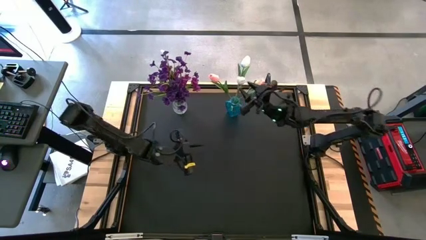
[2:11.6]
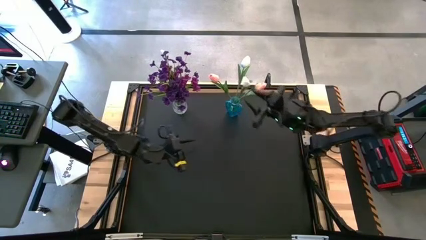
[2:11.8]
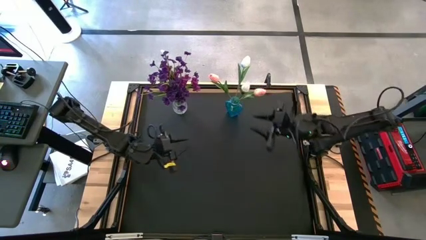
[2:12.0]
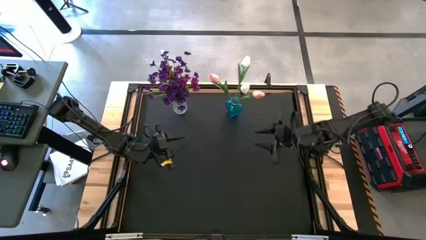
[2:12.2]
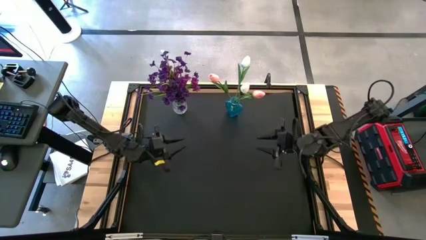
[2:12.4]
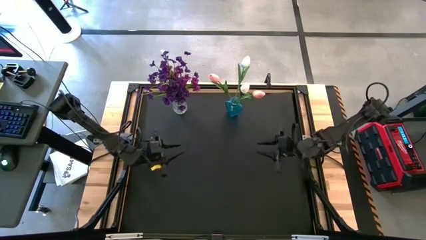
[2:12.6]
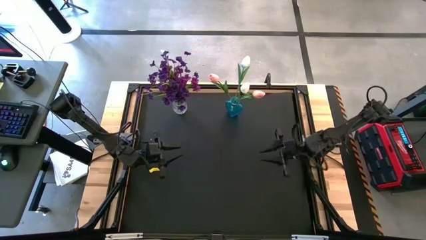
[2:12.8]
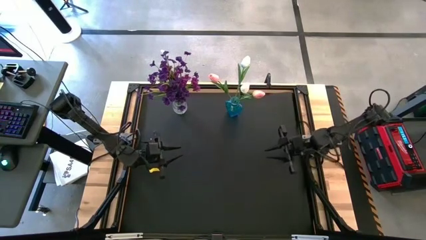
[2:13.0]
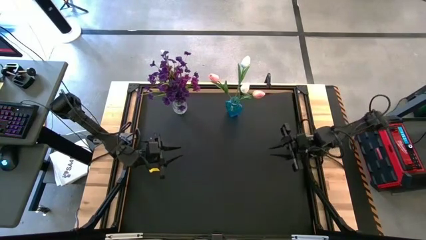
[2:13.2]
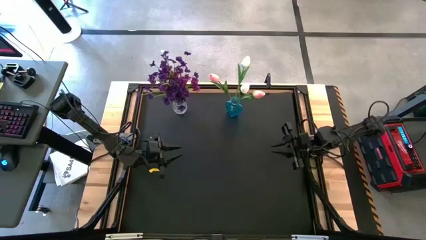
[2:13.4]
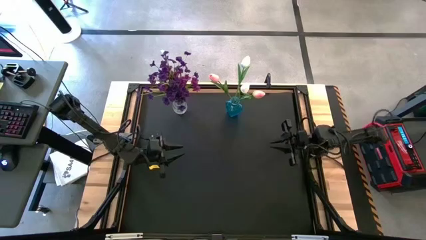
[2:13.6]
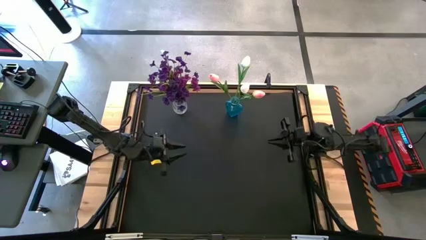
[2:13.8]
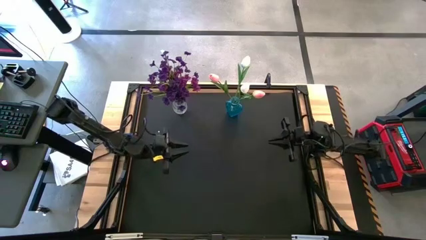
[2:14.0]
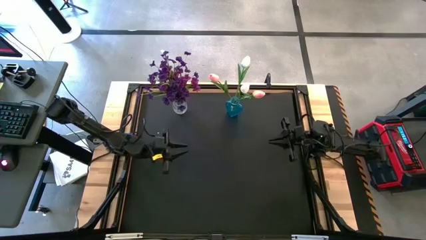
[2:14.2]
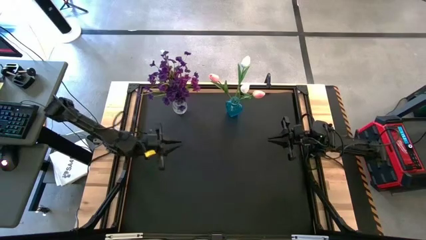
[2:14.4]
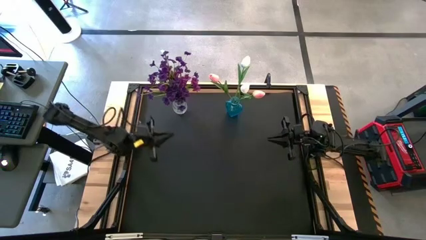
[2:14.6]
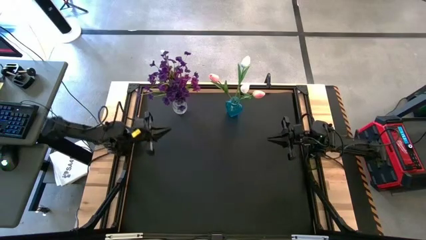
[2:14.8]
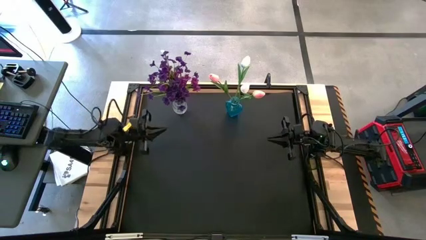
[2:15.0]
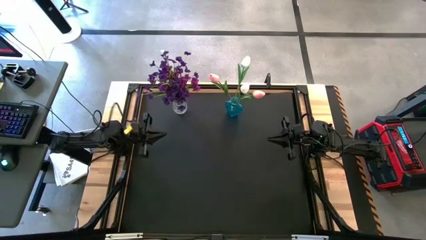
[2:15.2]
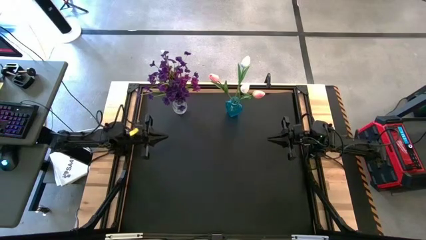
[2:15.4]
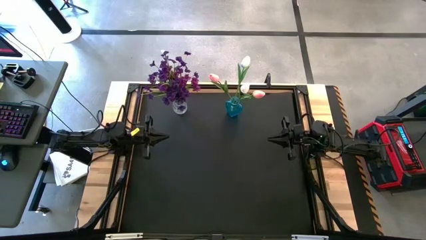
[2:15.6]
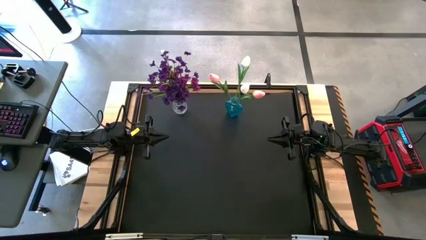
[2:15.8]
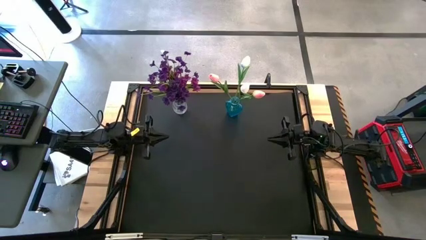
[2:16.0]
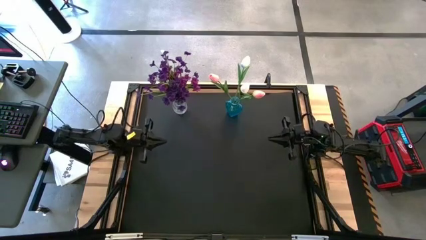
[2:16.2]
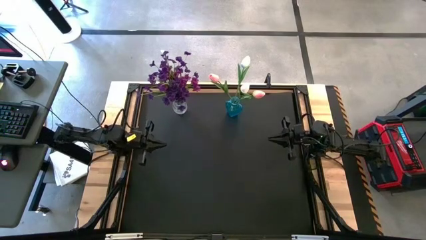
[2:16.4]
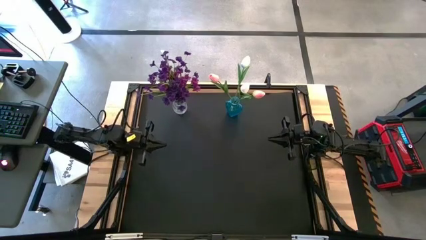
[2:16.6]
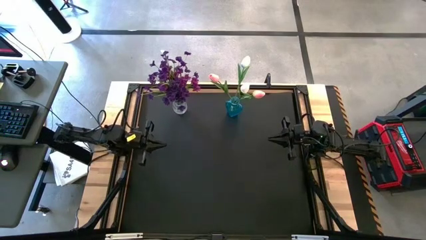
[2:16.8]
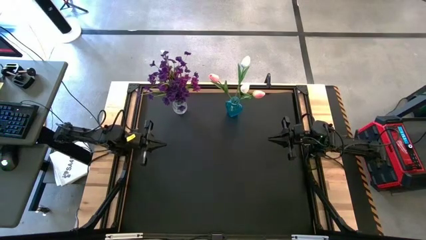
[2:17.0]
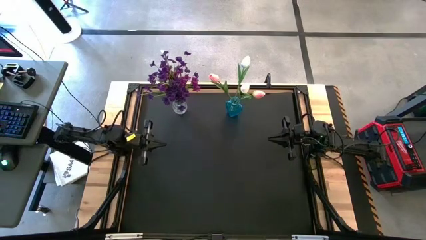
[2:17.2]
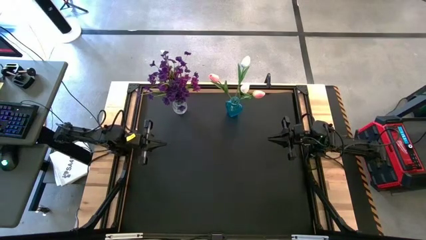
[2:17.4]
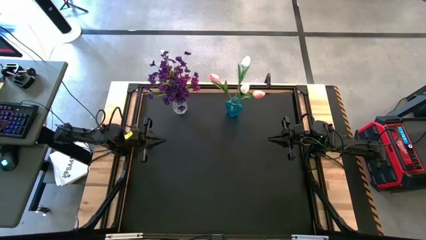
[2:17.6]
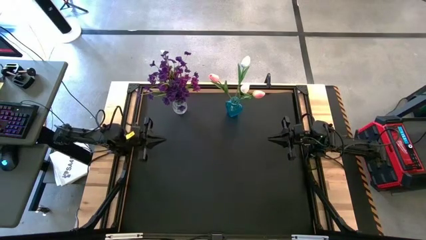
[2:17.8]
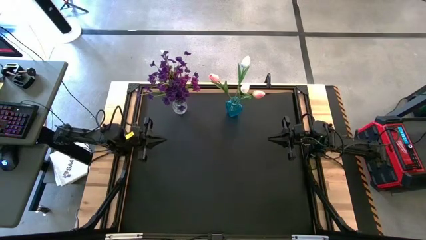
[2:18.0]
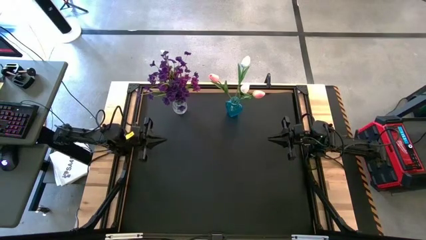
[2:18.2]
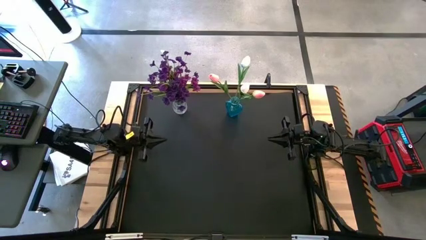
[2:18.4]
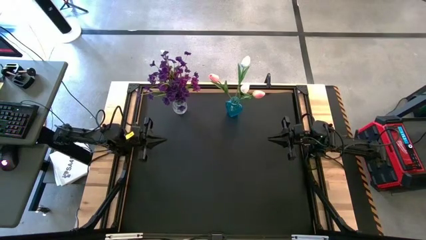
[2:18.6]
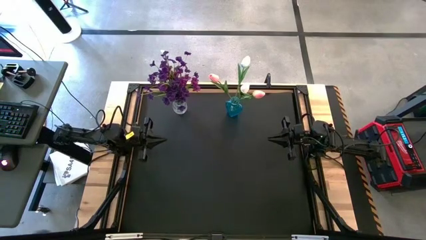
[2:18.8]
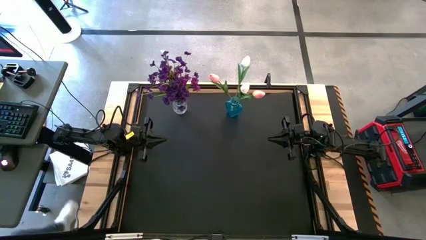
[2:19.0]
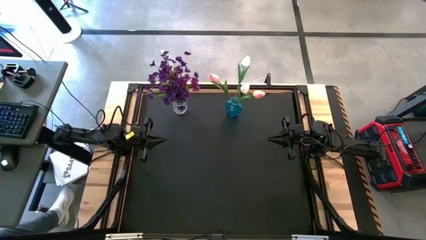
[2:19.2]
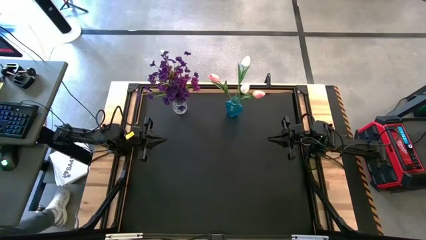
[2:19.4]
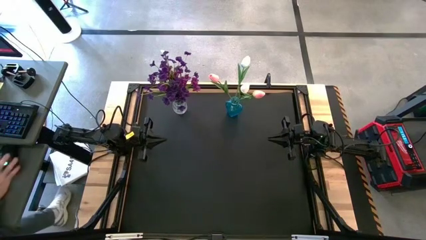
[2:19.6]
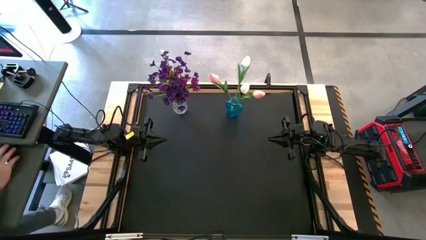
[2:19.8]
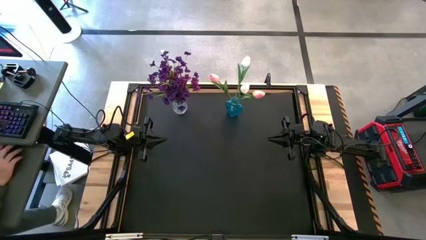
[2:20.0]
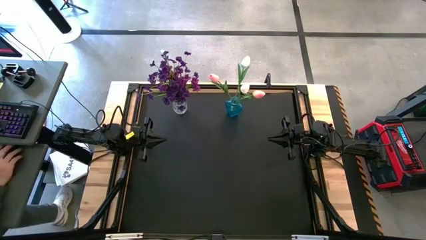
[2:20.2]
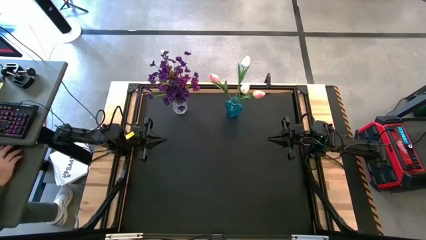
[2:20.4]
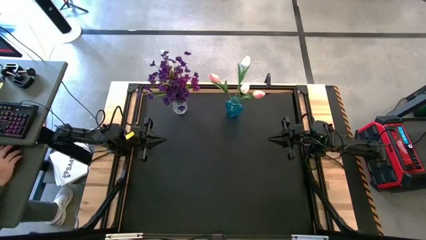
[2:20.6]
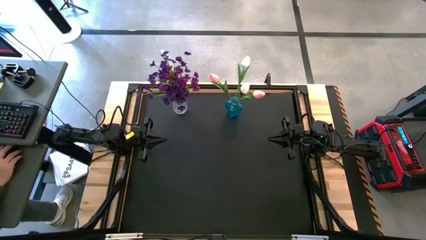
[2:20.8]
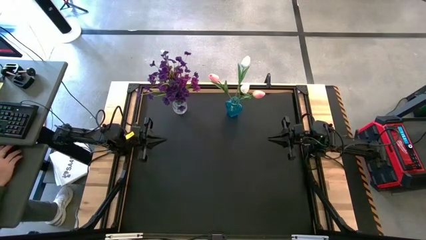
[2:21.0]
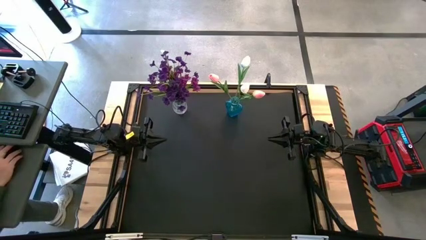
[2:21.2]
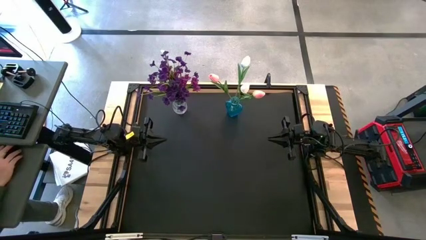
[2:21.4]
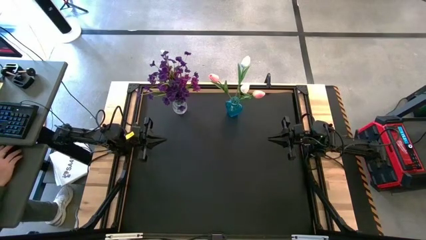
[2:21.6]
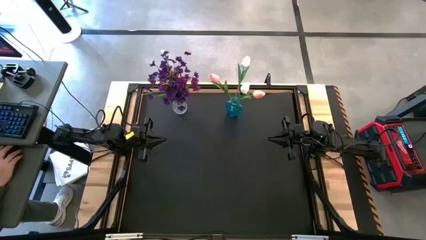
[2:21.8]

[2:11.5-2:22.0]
Task: Sort flowers into vase by color
Return to Home Position

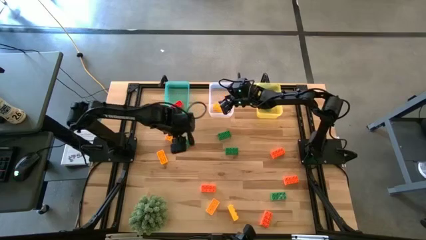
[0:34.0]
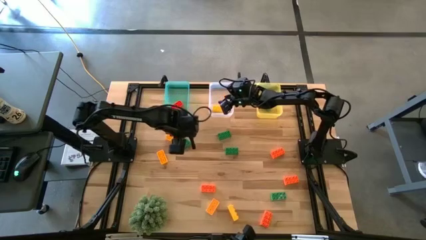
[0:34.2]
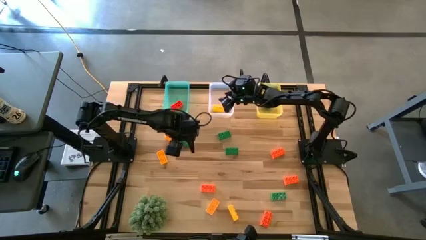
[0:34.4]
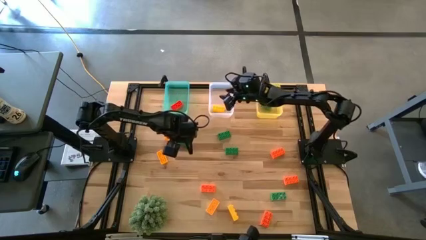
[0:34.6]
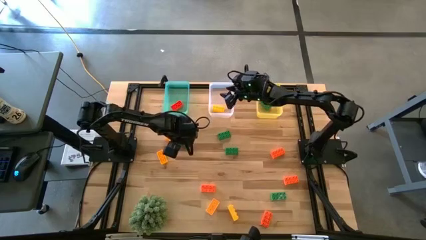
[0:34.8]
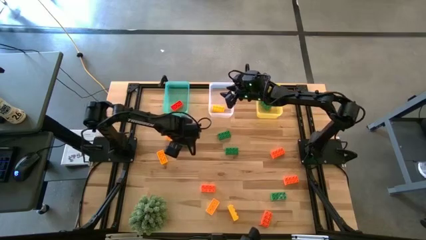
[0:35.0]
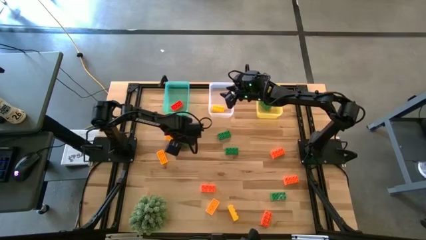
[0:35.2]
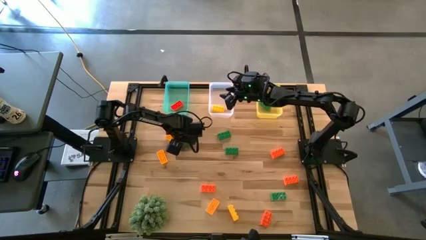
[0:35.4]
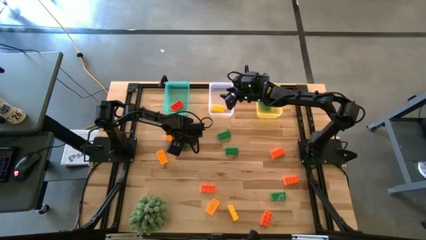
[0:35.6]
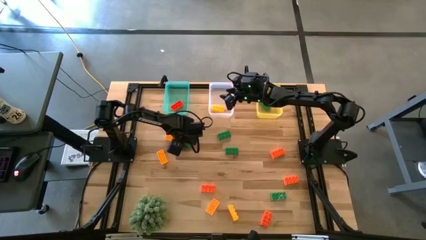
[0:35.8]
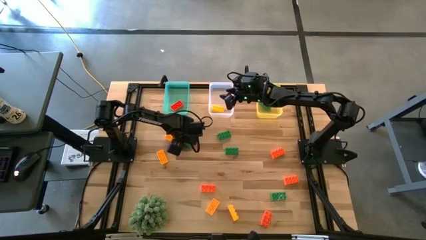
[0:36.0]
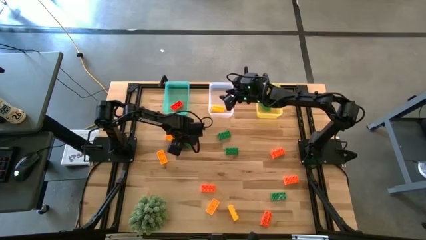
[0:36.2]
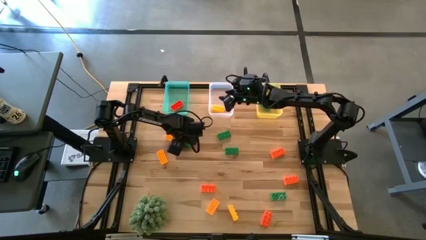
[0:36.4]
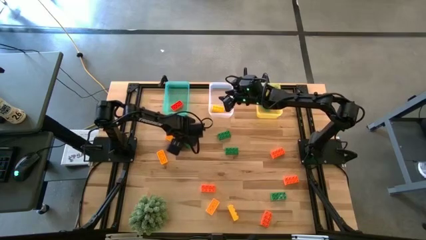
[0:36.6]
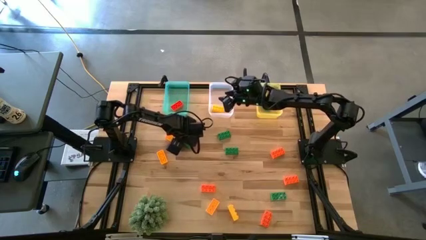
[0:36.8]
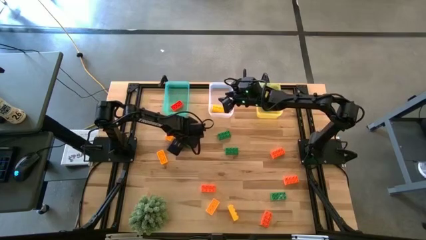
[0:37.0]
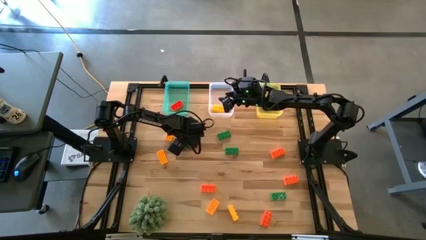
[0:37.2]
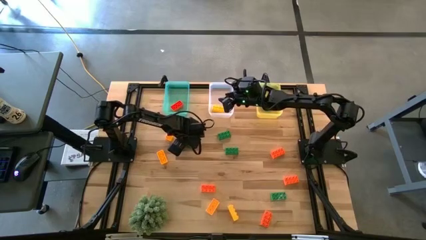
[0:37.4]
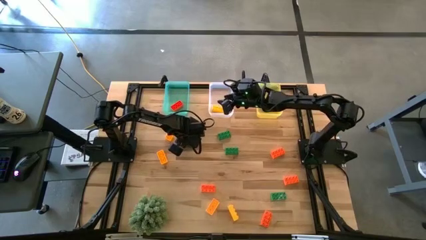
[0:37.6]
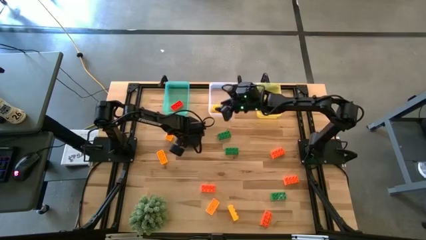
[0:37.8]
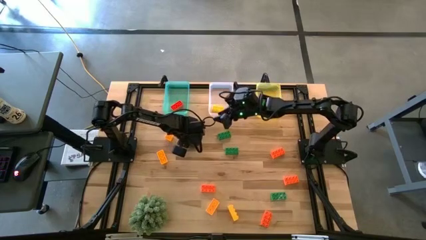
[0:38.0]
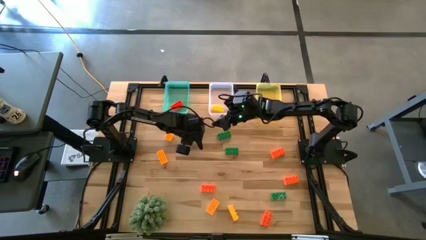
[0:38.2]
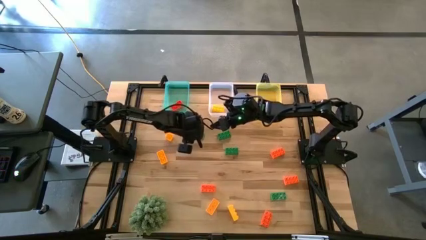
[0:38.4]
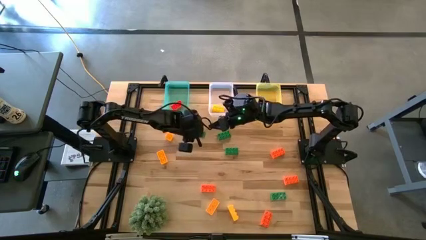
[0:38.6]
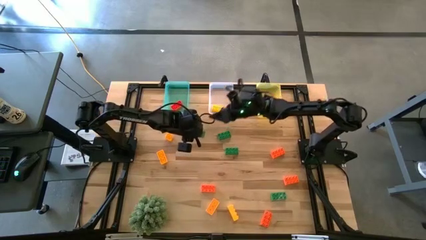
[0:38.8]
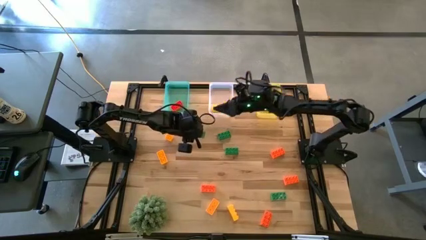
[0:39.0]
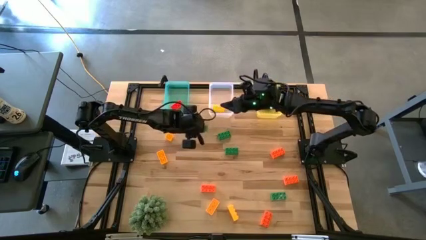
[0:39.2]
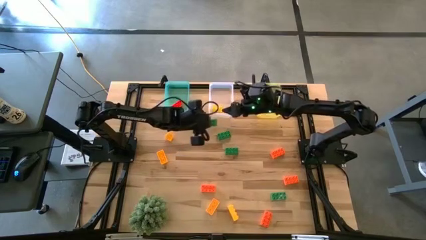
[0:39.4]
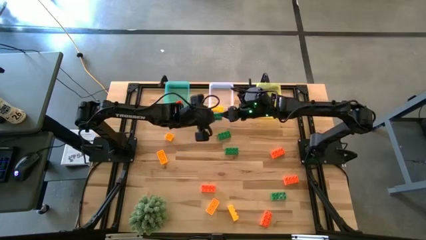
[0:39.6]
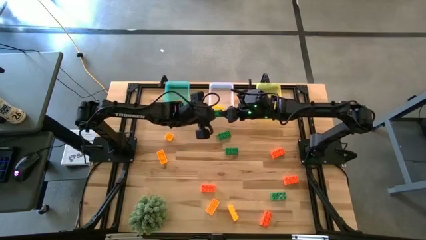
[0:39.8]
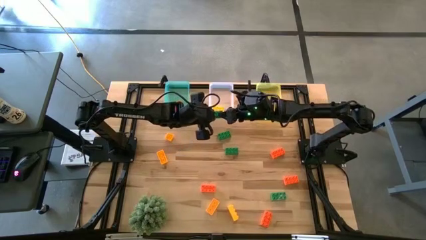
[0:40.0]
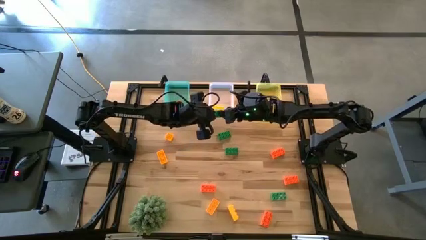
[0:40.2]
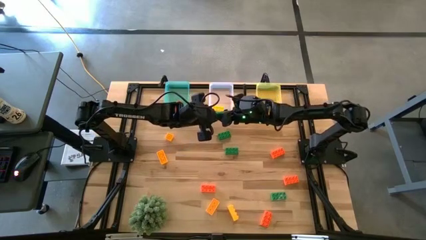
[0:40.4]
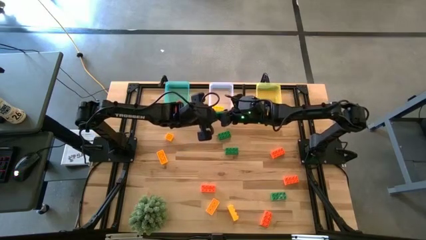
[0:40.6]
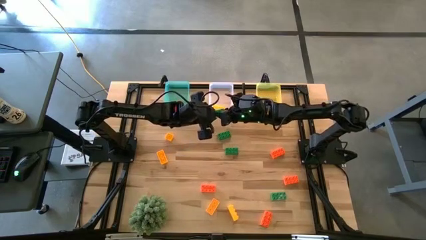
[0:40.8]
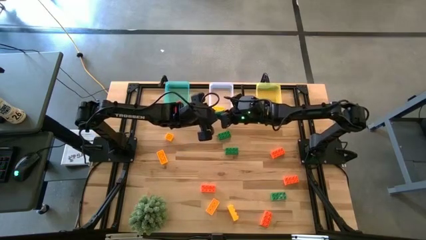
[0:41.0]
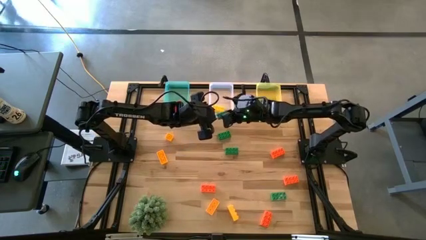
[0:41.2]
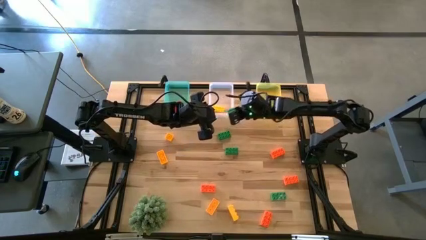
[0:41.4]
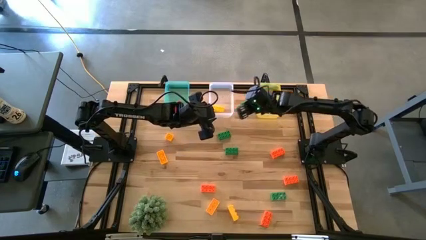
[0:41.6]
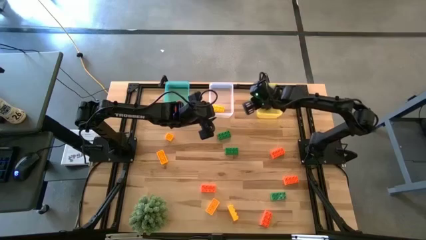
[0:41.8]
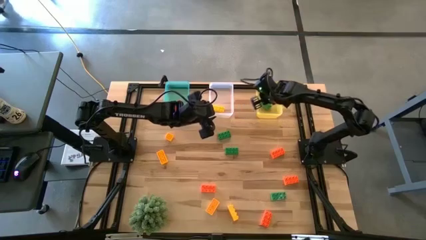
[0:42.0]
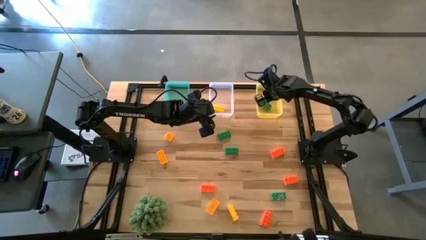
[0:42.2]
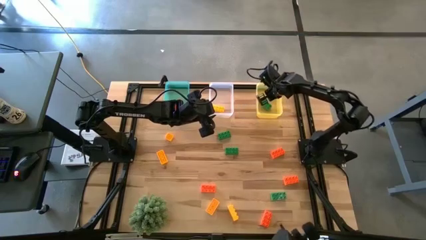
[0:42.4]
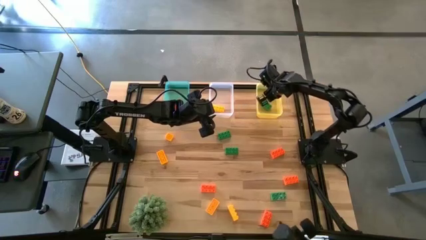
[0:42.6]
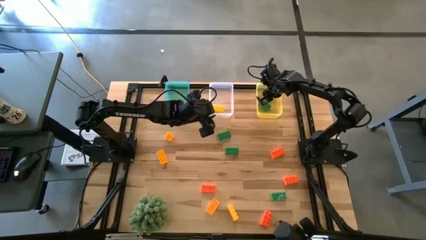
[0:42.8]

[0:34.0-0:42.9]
Task: Sort & place blocks by color
Put the green game piece into the yellow bin
